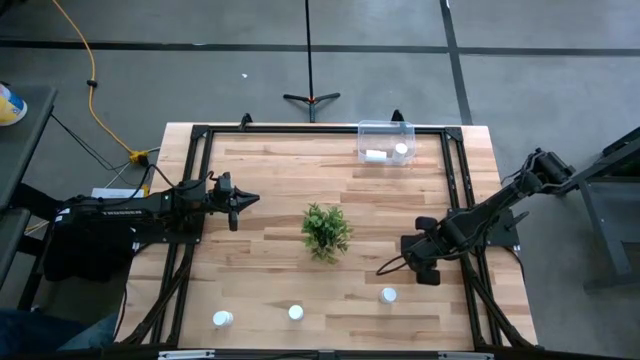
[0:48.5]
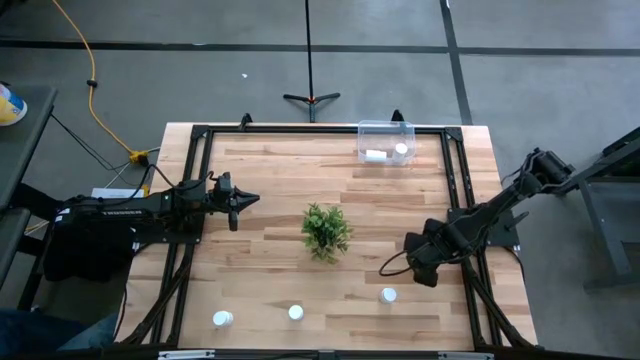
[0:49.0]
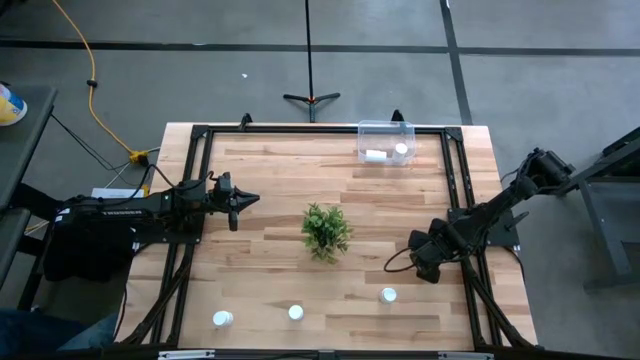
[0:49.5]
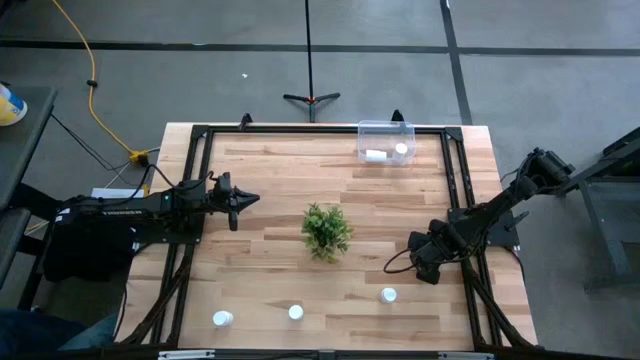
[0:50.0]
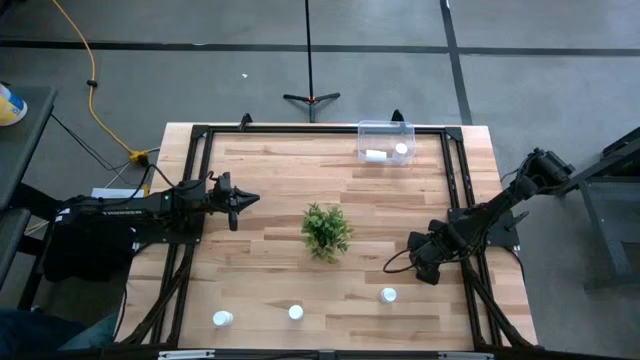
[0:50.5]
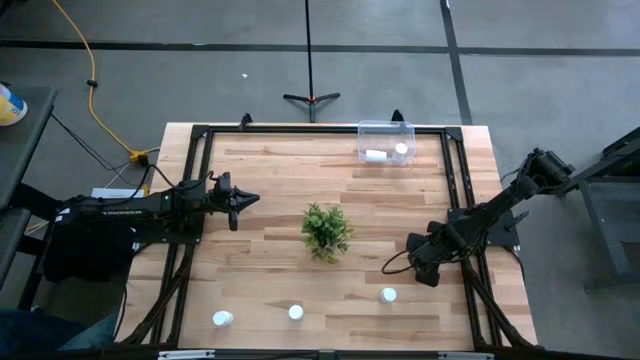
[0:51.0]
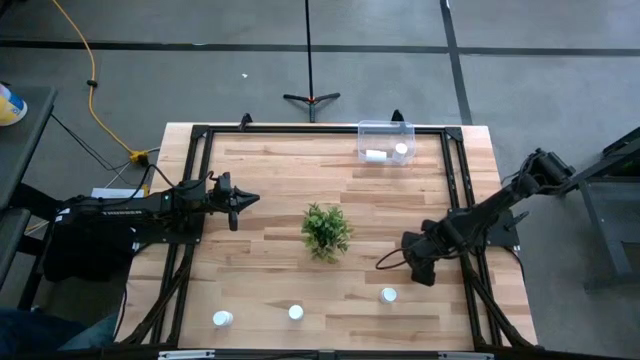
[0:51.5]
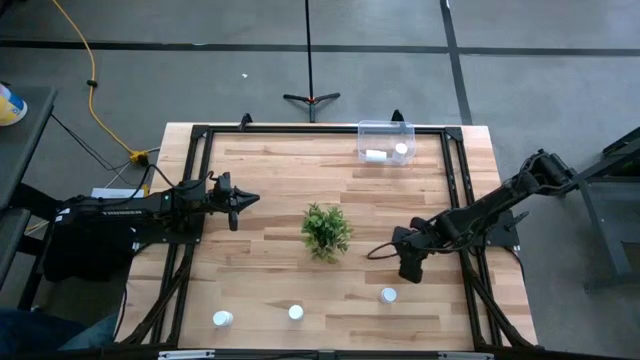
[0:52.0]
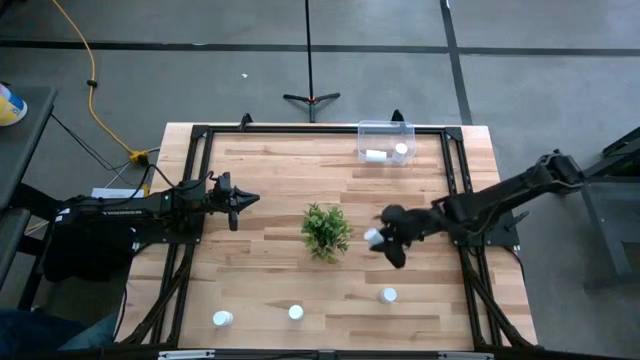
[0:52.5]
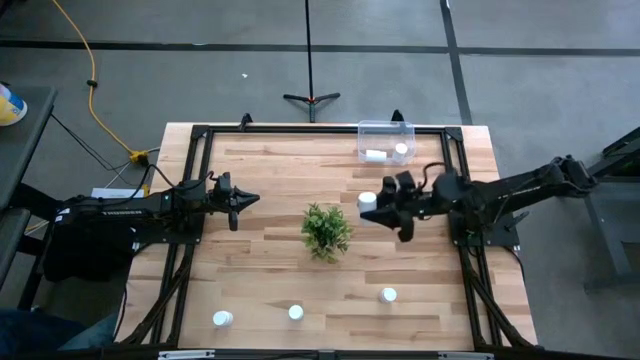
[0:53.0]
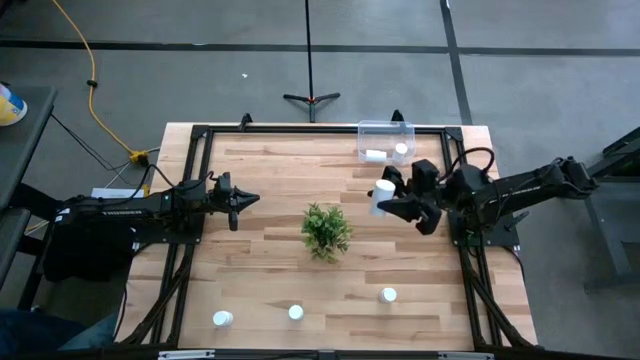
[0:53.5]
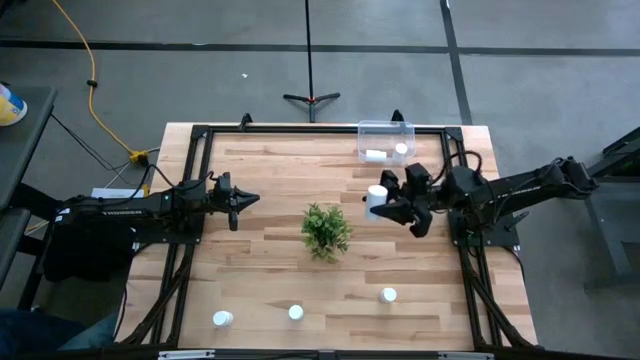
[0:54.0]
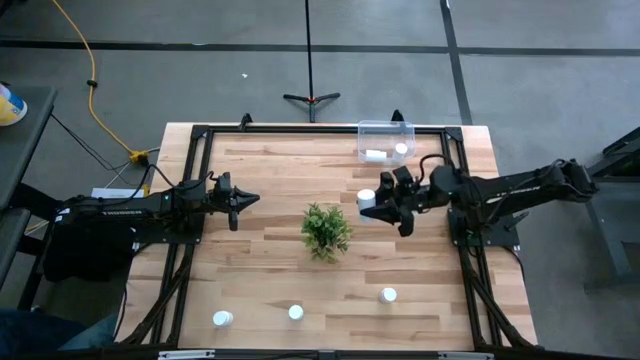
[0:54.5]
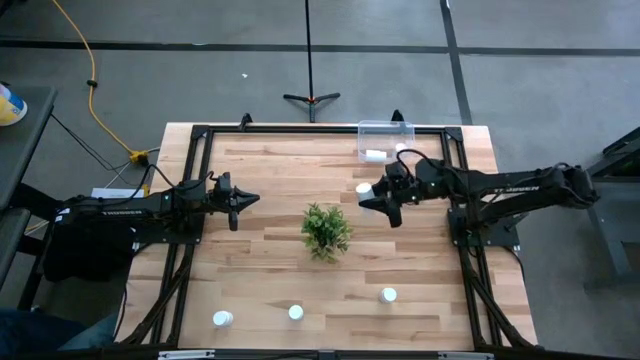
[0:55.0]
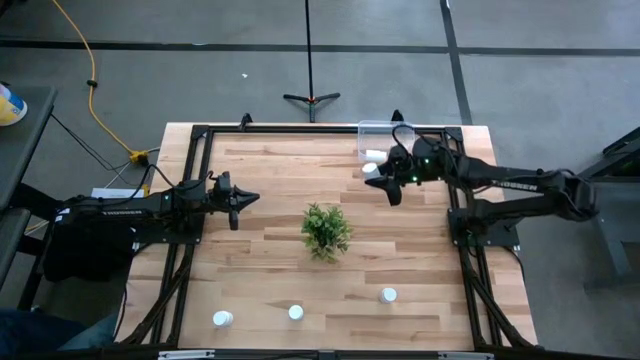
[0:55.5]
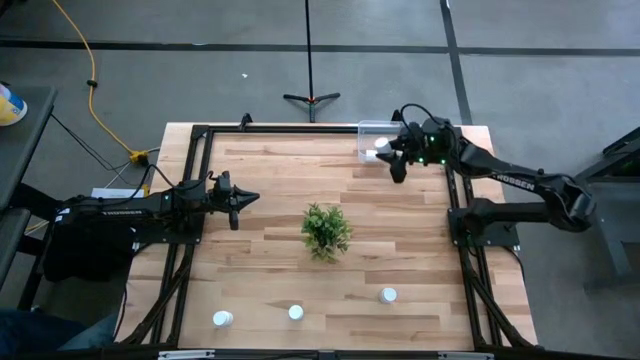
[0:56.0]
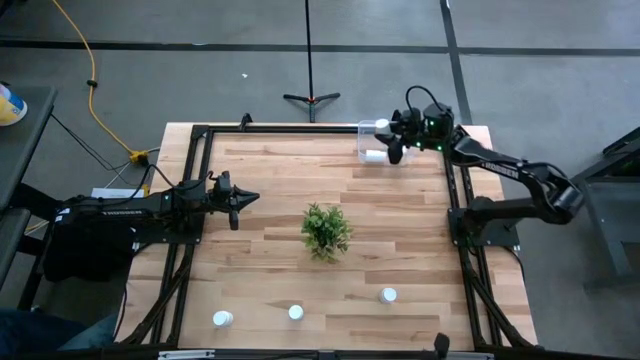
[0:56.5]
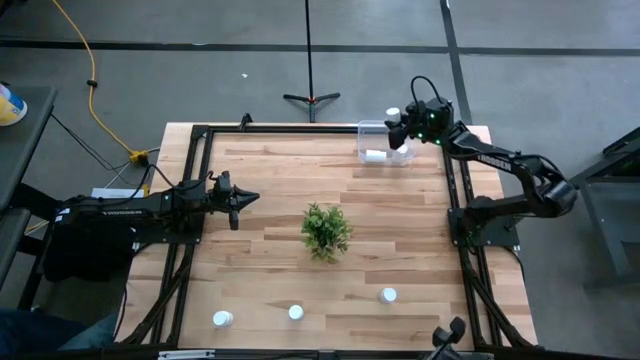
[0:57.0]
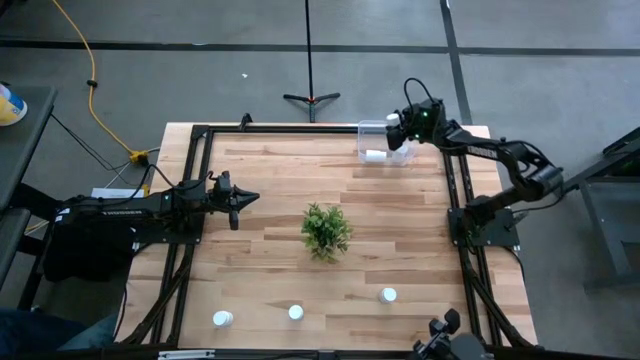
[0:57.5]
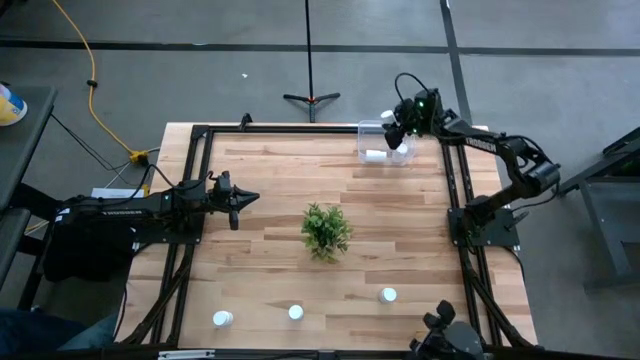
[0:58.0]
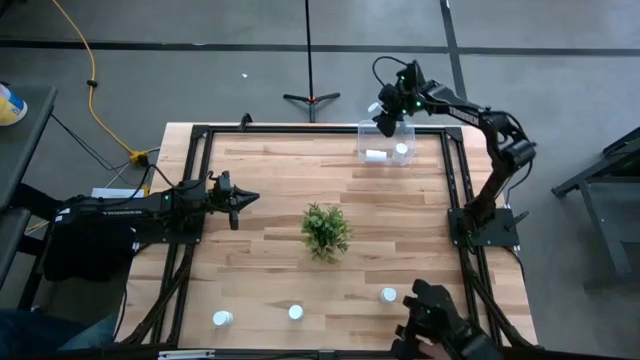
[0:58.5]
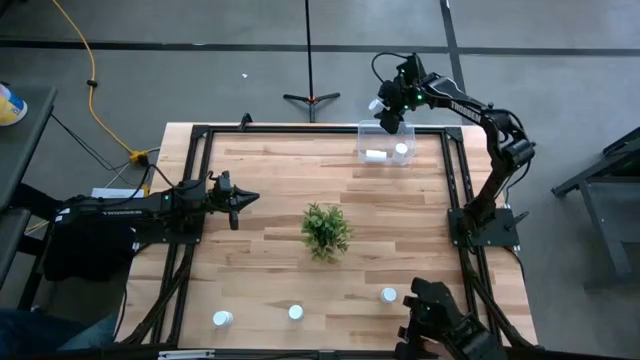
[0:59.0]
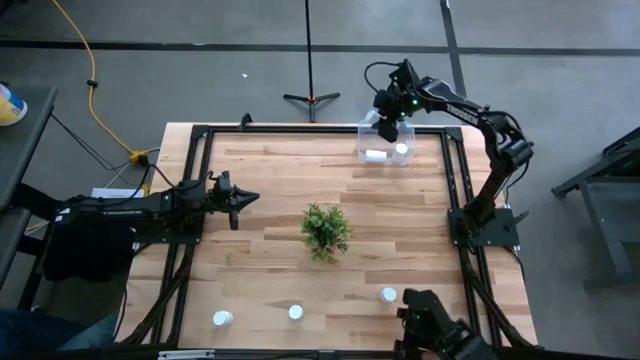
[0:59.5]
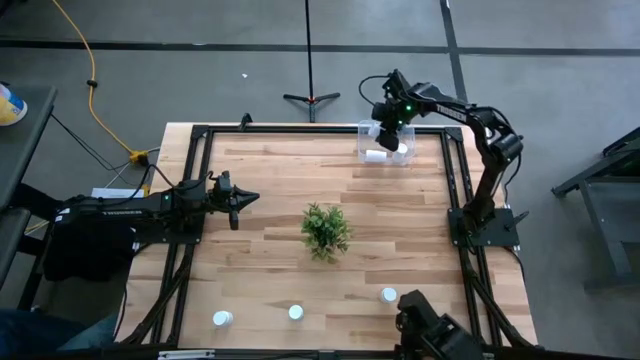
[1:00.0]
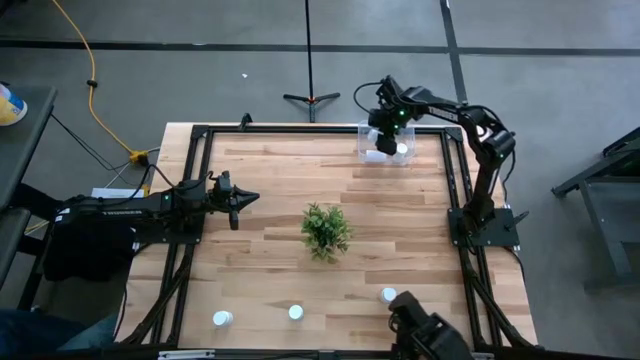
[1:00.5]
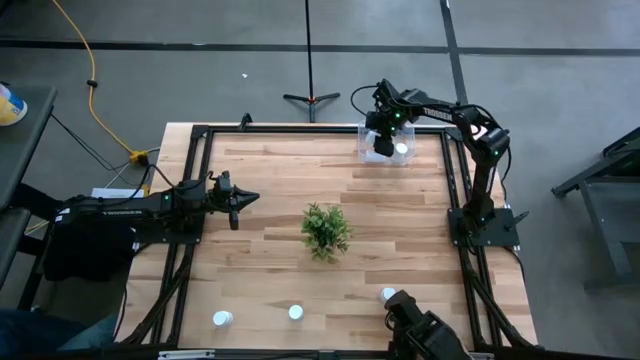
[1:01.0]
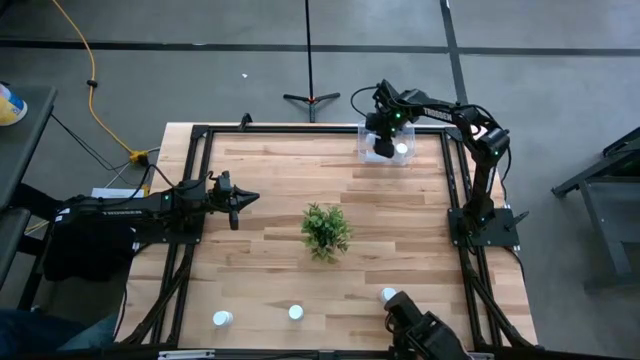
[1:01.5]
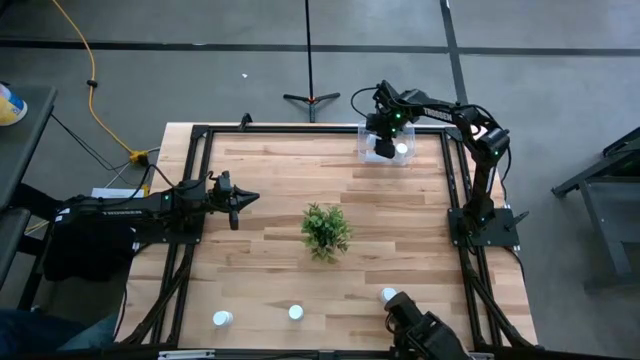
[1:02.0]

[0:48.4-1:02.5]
Task: Pick and place pill bottles into a basket
Put the white pill bottle into the transparent bin

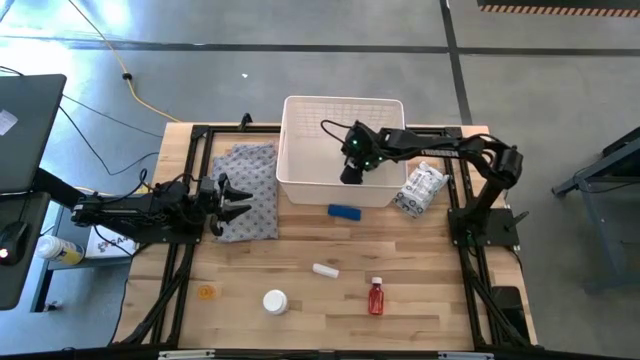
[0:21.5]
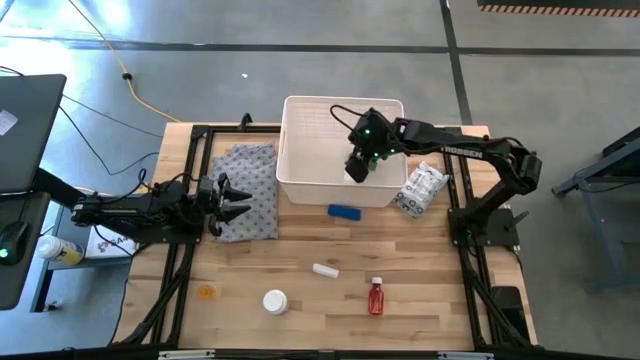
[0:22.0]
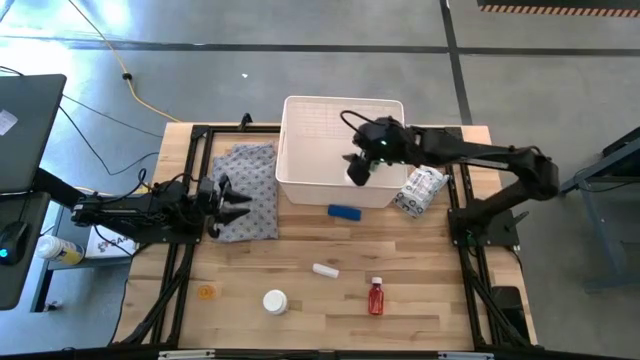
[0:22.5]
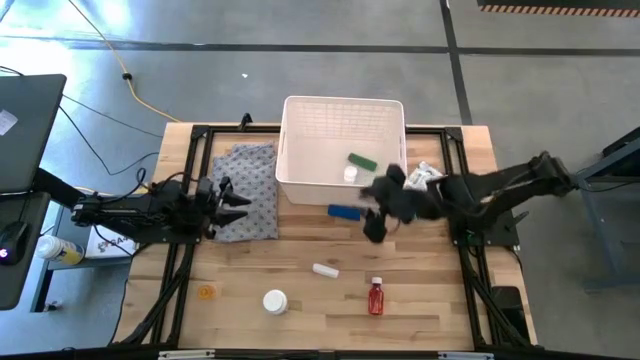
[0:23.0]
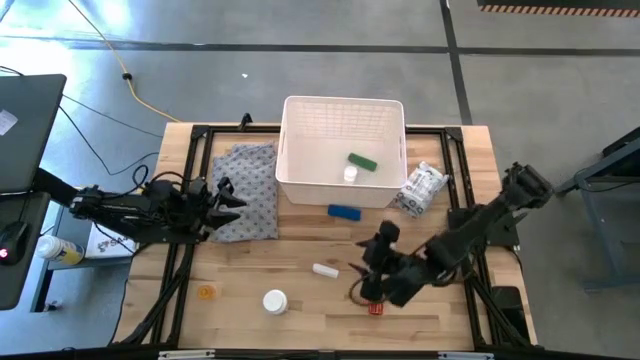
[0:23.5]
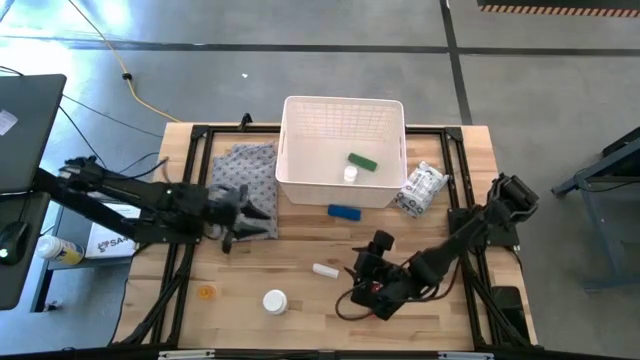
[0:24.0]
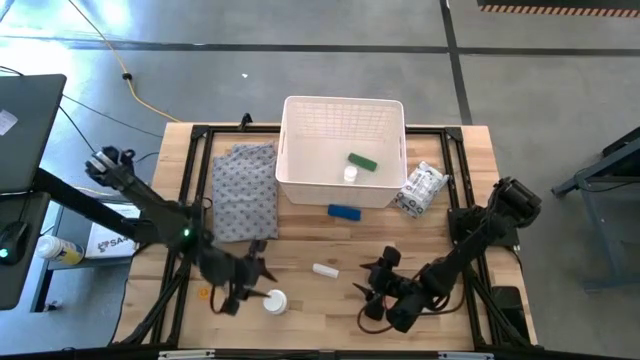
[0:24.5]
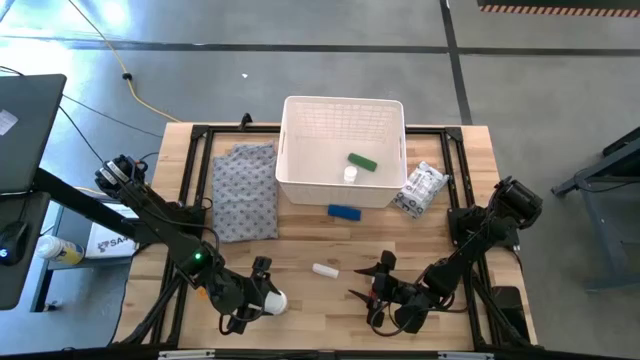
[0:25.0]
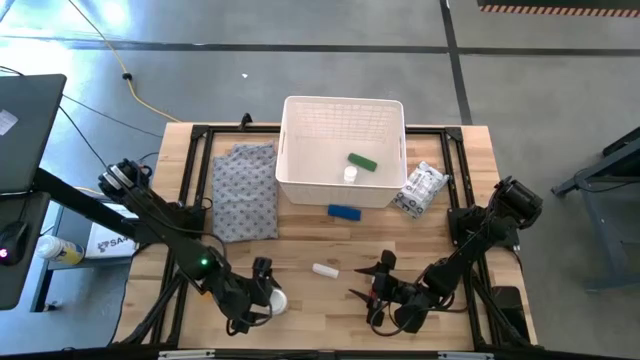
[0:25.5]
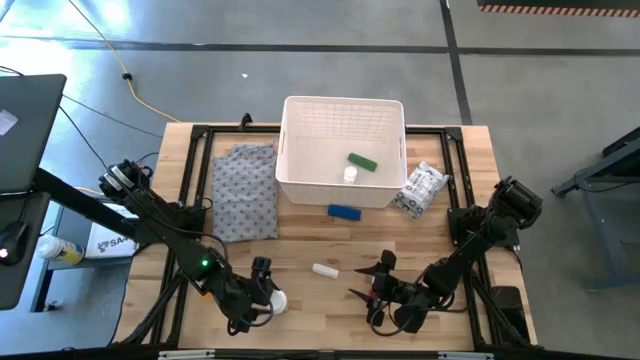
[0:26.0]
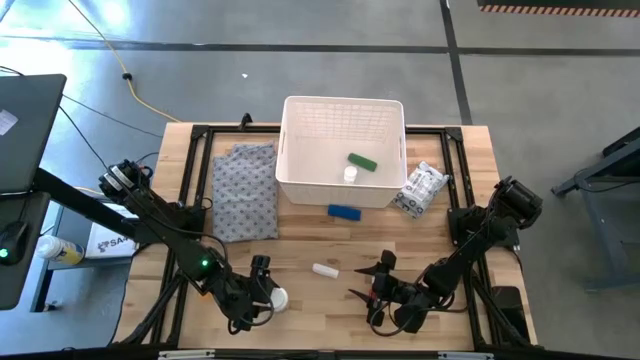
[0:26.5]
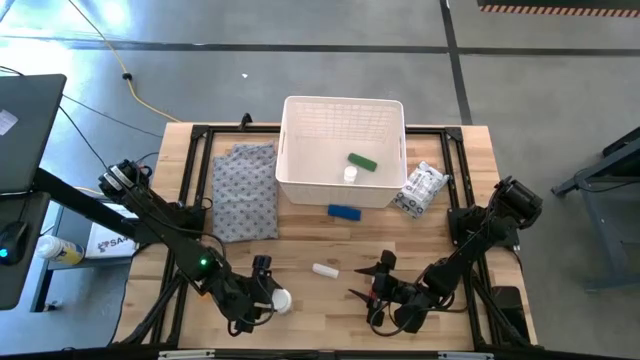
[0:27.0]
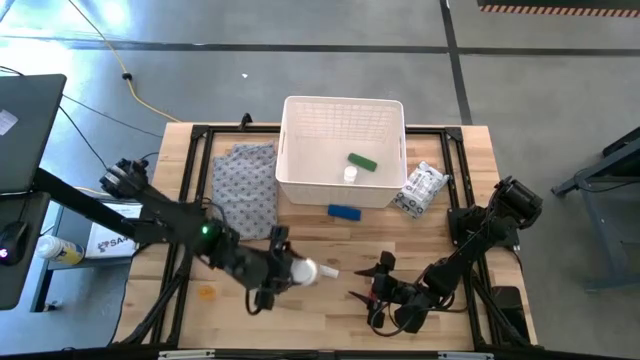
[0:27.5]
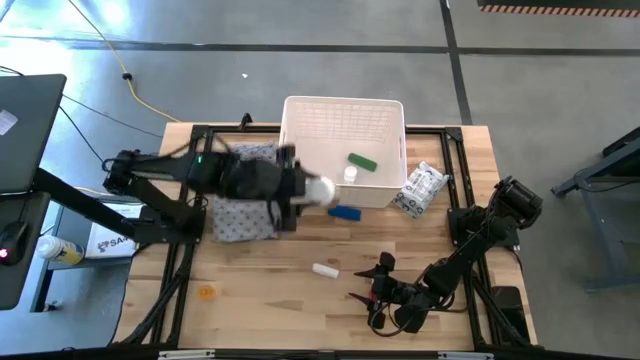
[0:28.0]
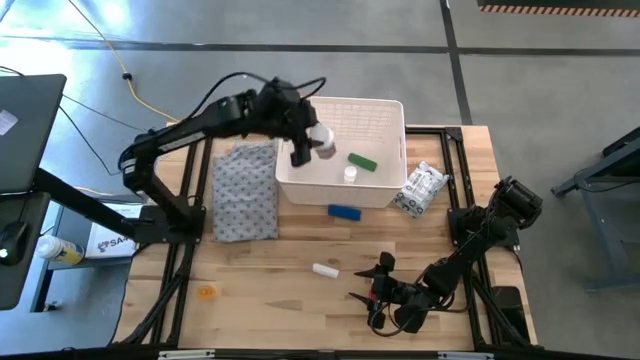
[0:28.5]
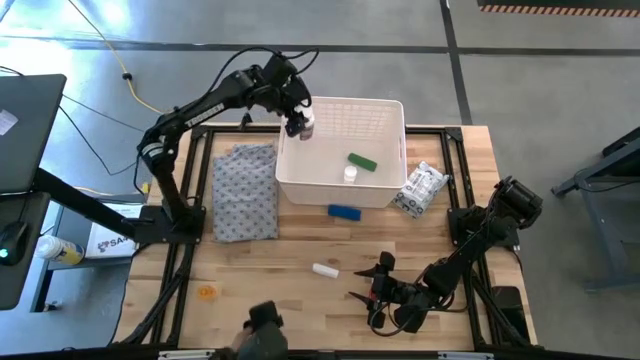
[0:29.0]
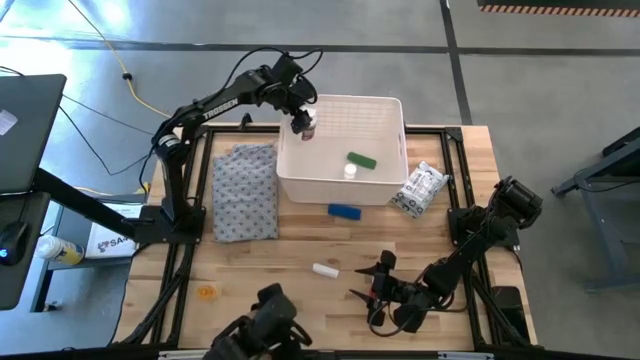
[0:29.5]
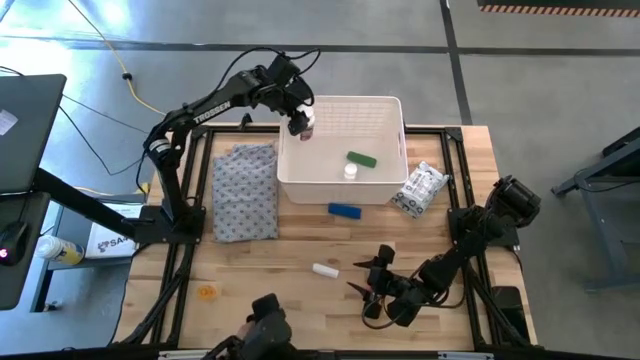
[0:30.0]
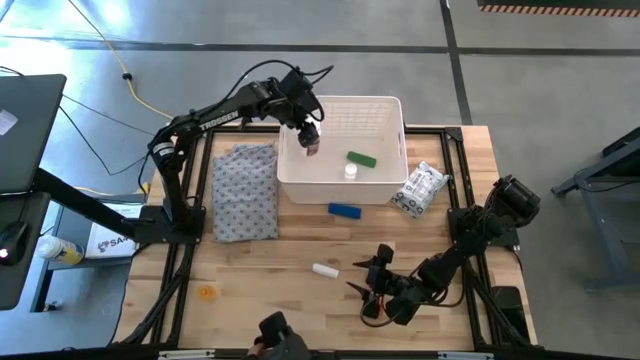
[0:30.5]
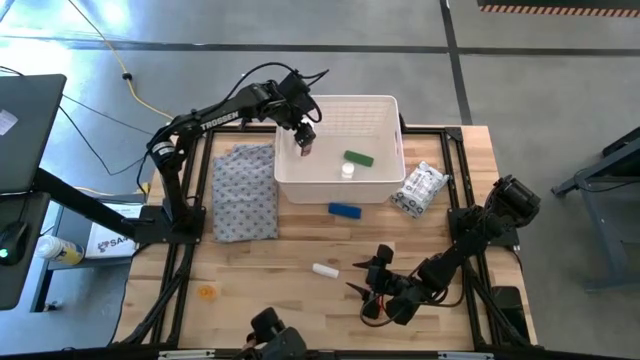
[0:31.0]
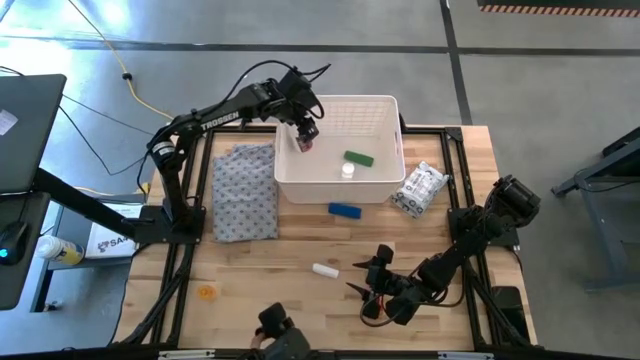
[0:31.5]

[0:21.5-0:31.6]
Task: Pick & place medical supplies in basket/bin
Put the white pill bottle into the white bin
